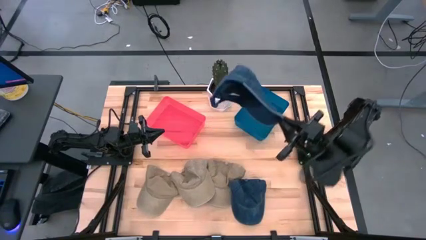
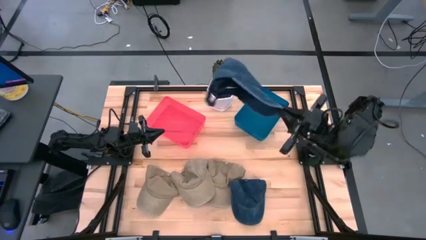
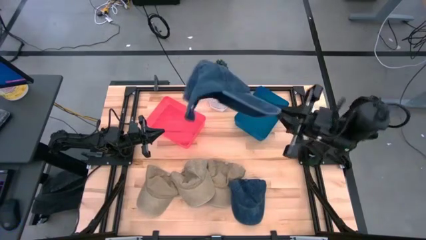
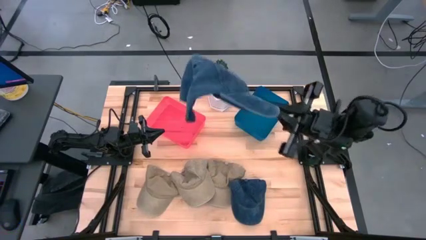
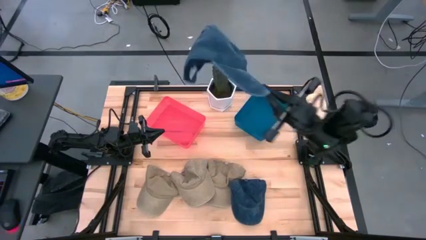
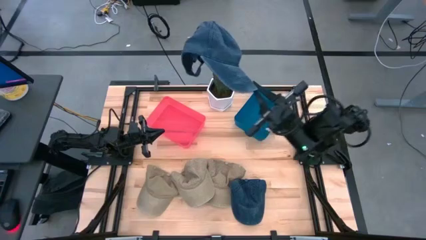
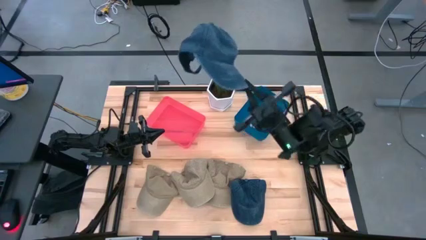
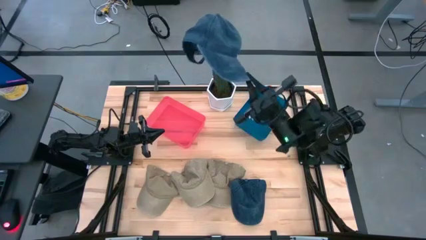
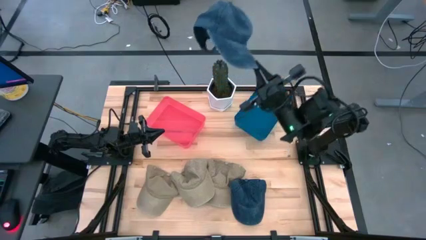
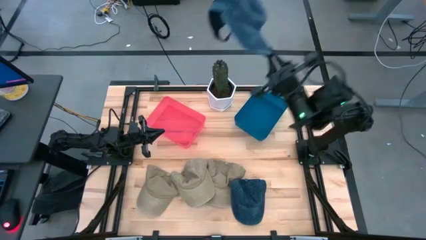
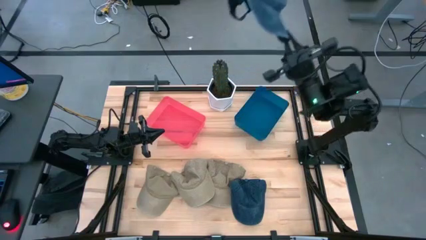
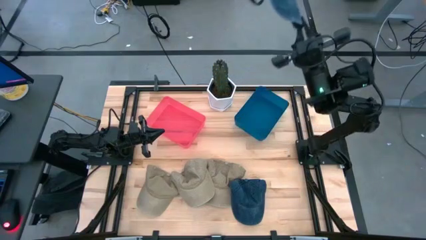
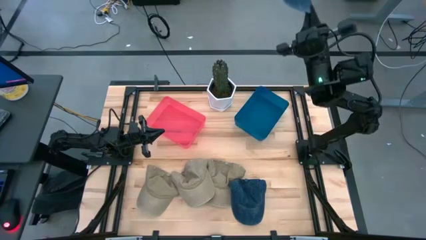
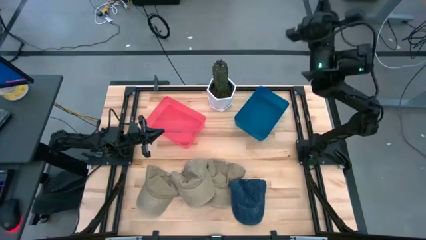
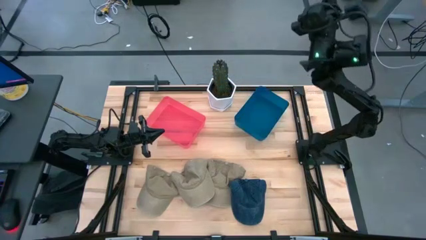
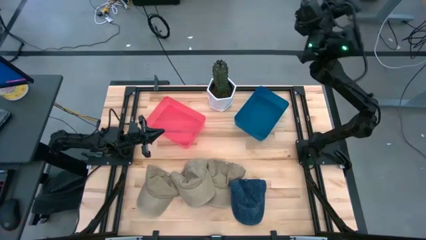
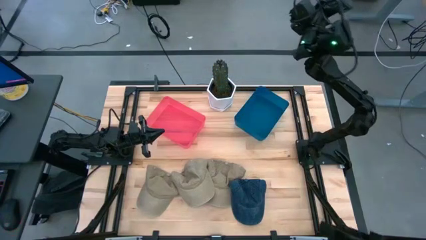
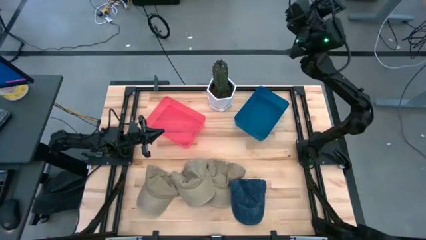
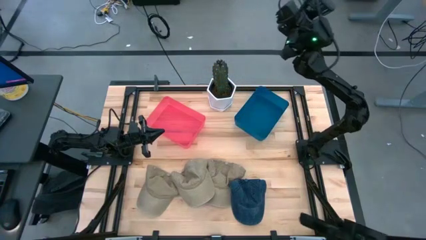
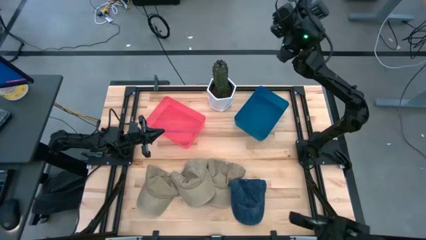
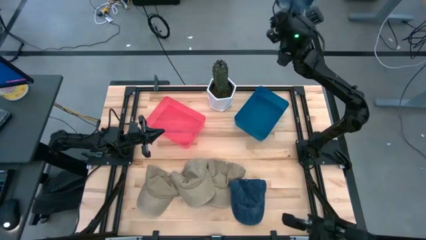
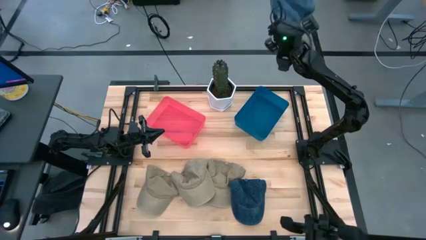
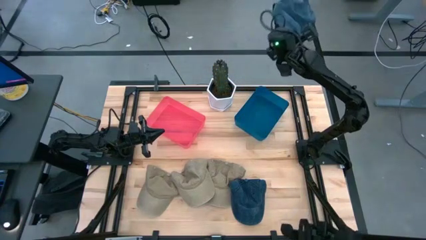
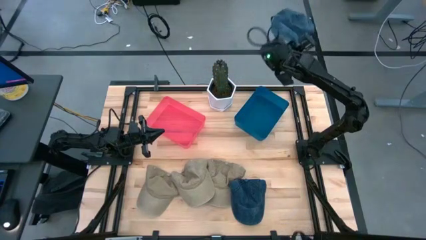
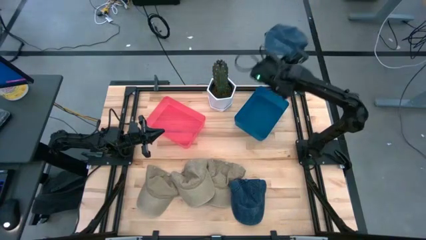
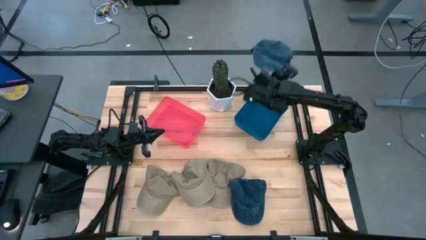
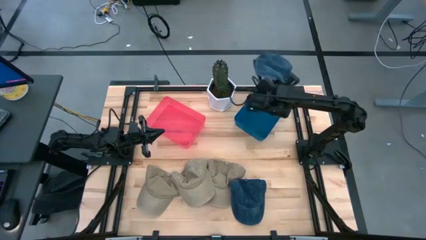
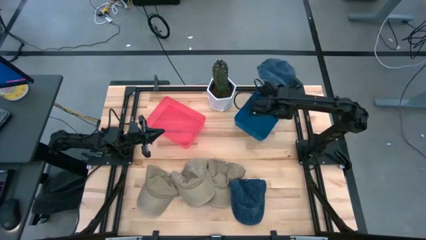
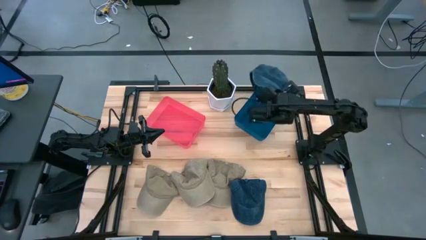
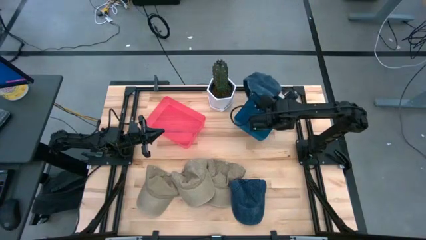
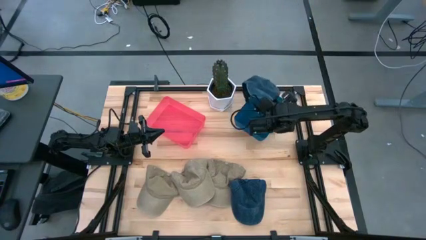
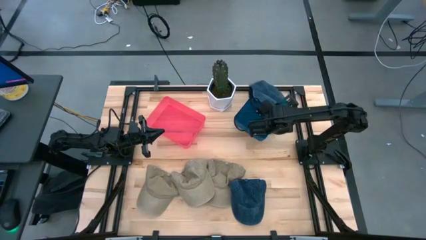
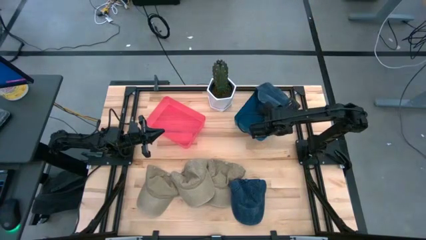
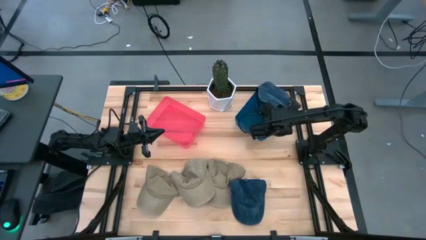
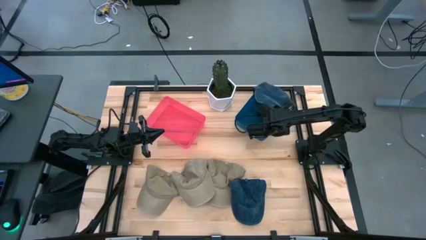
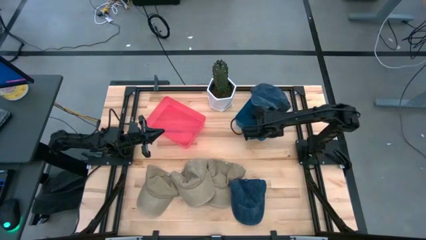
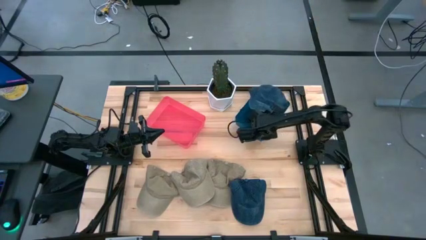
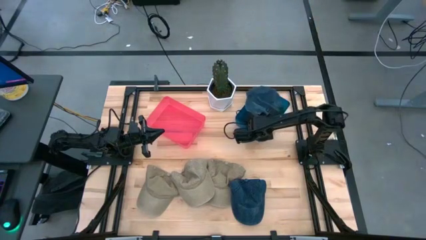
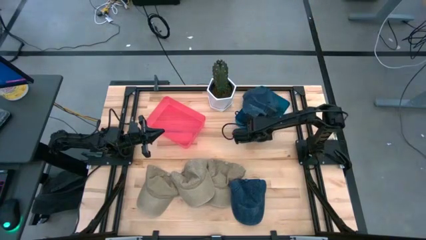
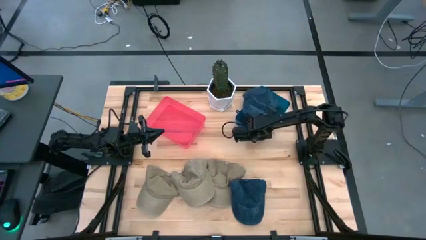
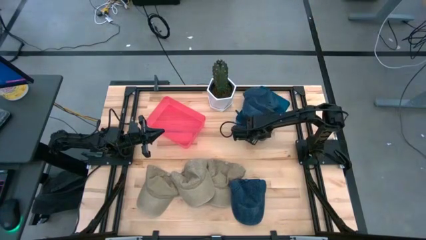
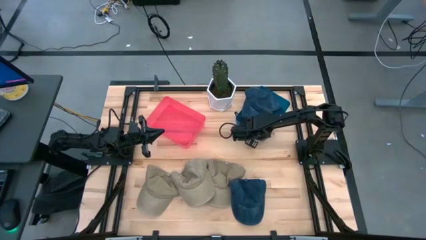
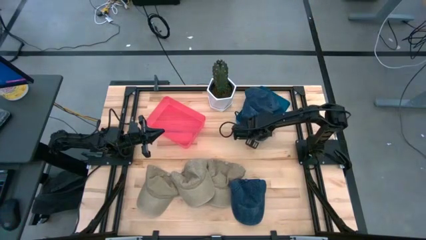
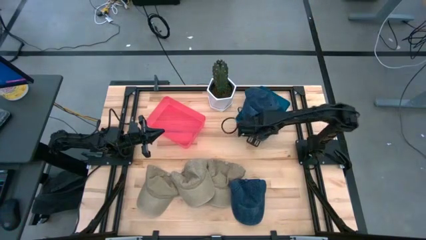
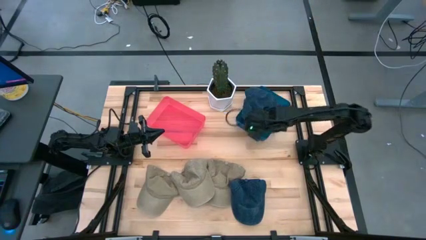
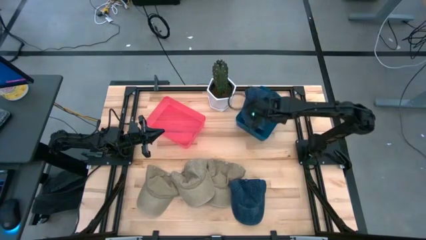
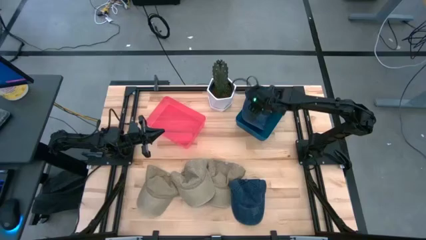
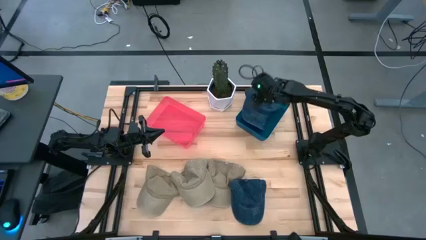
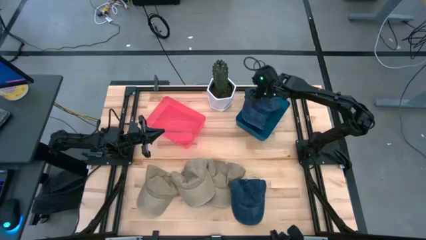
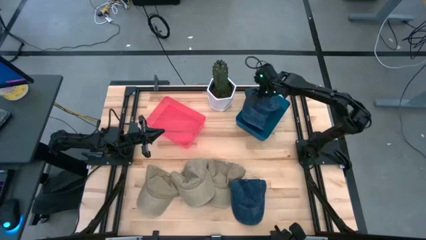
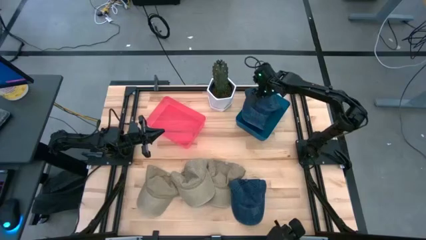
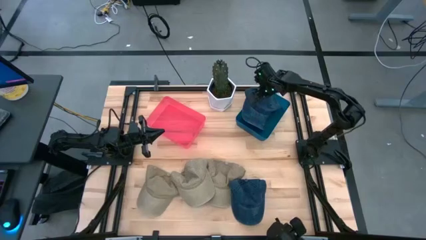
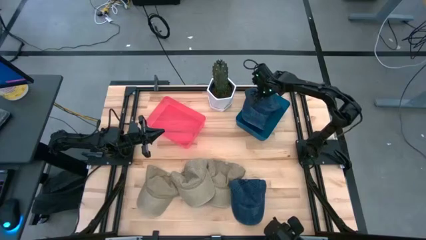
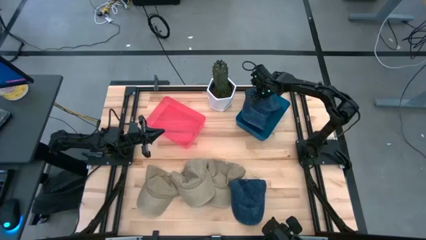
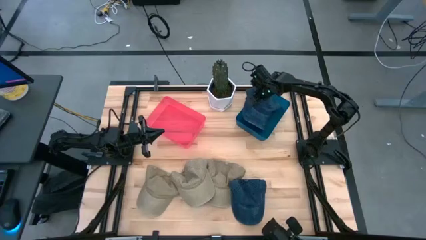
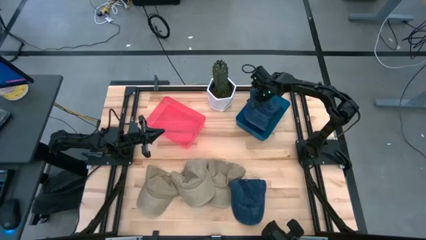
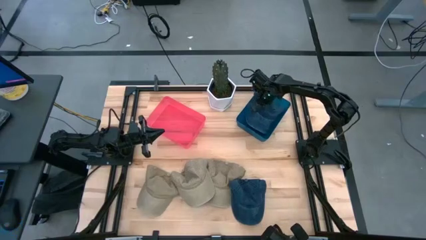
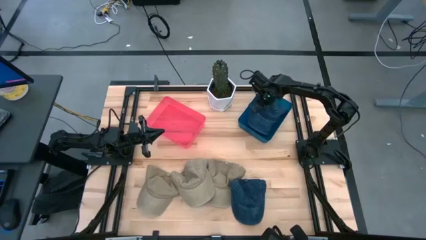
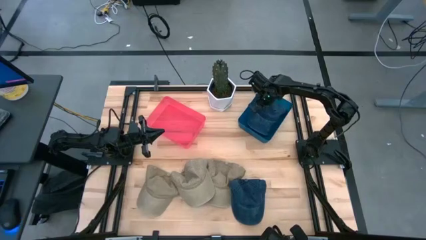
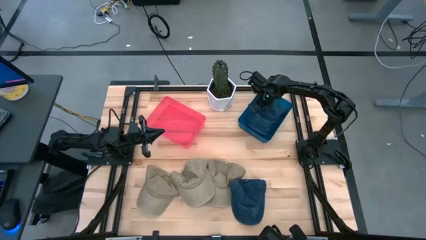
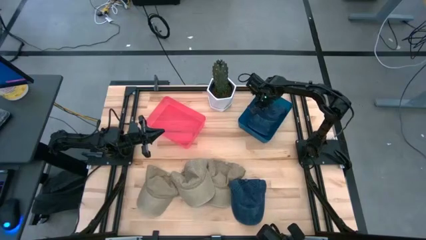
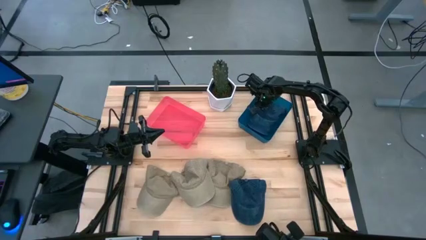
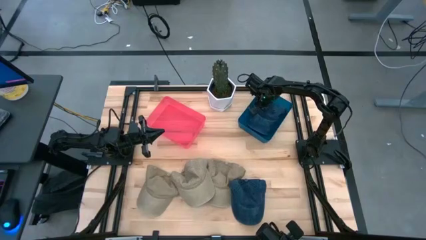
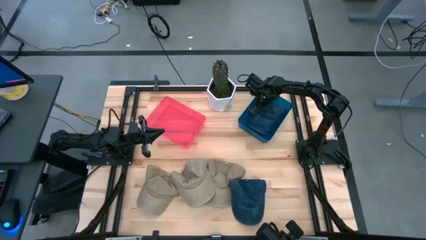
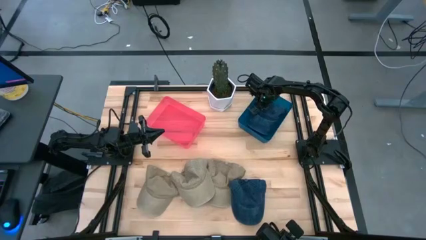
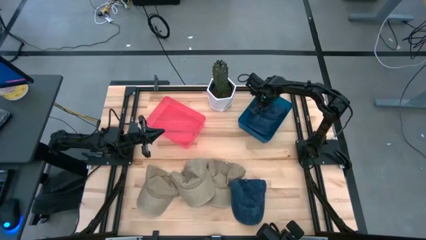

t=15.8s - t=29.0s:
Task: Pick & Place hat
Put the right blue cap into the blue bin
